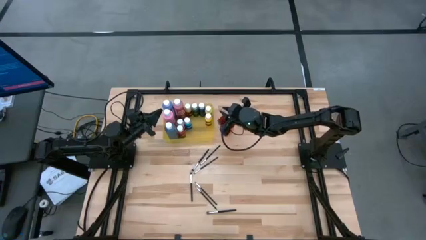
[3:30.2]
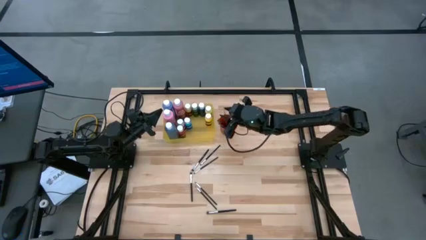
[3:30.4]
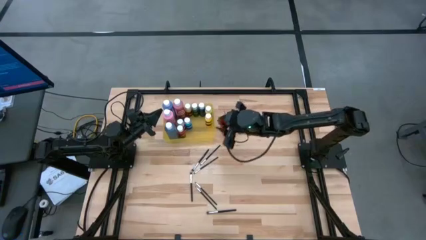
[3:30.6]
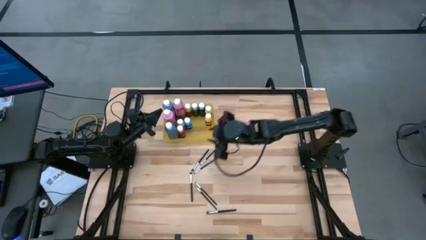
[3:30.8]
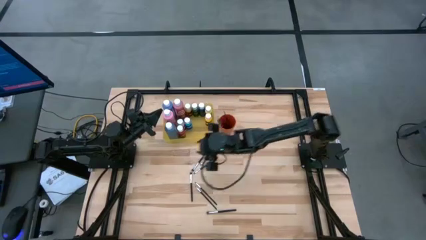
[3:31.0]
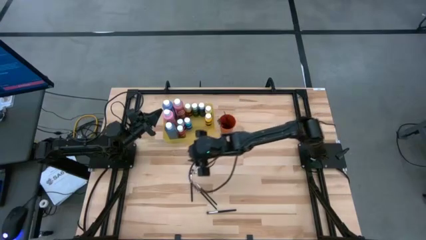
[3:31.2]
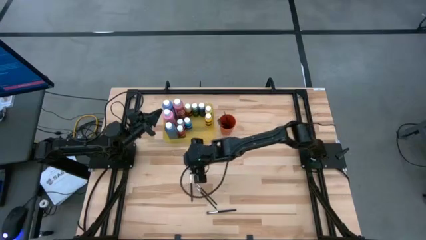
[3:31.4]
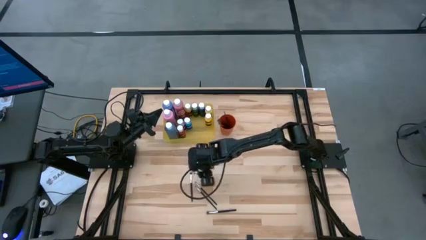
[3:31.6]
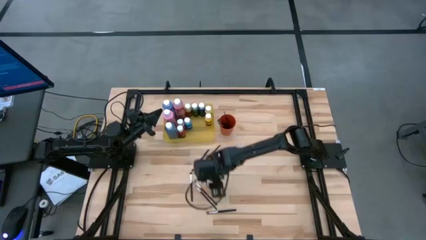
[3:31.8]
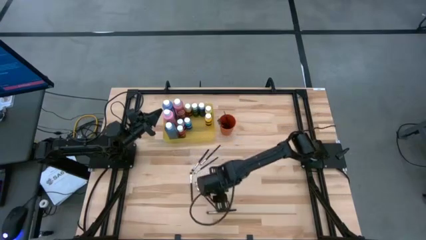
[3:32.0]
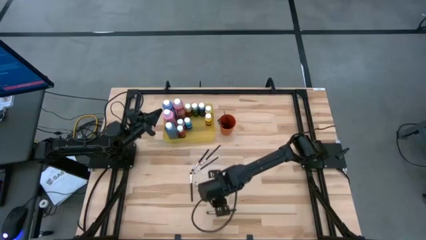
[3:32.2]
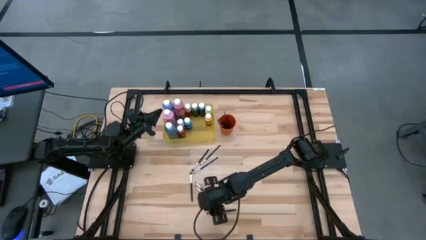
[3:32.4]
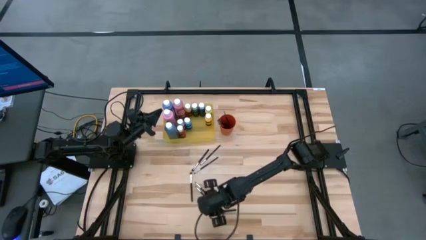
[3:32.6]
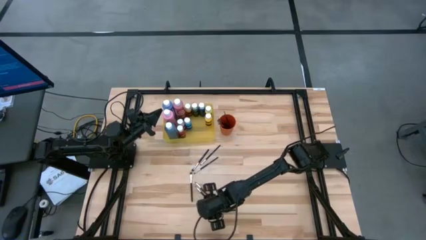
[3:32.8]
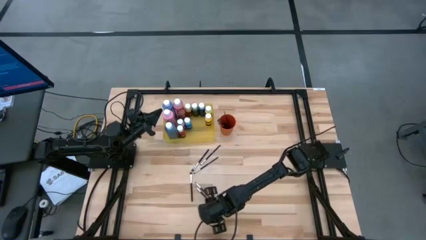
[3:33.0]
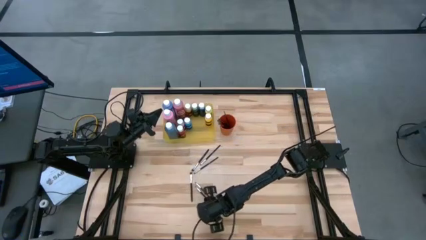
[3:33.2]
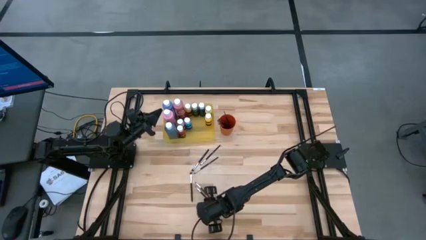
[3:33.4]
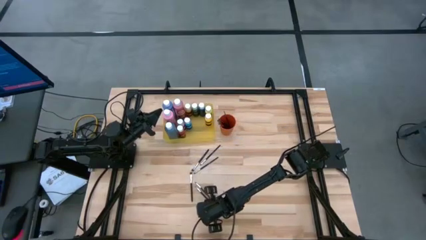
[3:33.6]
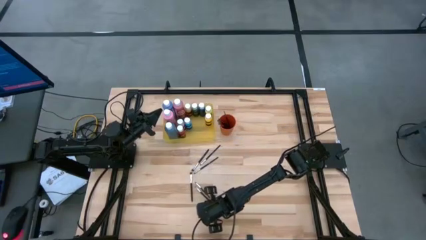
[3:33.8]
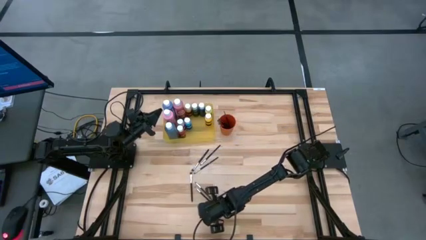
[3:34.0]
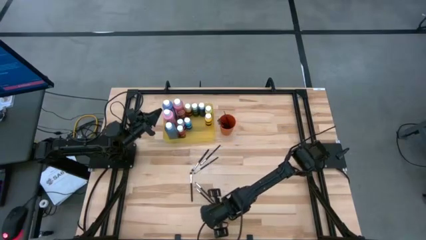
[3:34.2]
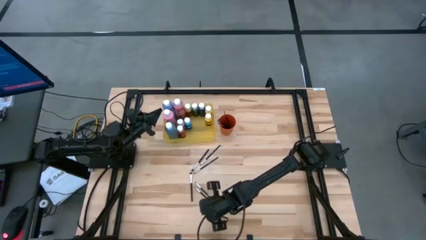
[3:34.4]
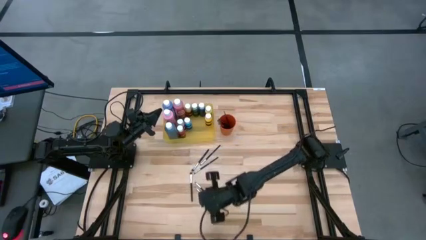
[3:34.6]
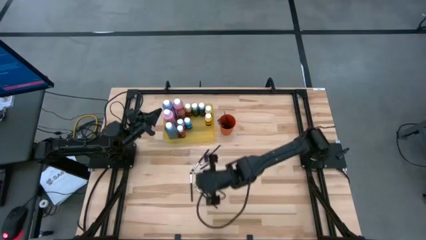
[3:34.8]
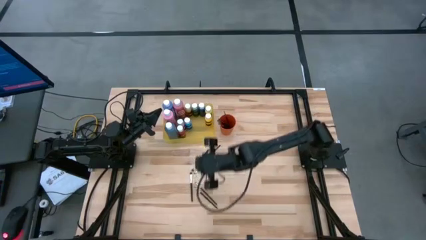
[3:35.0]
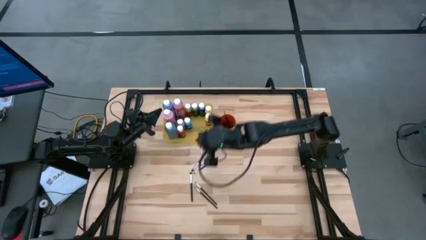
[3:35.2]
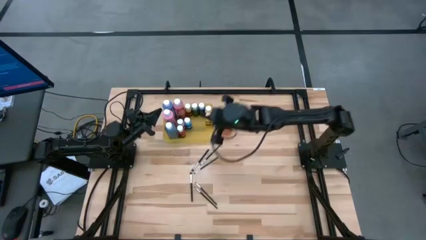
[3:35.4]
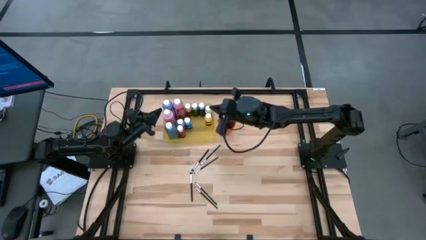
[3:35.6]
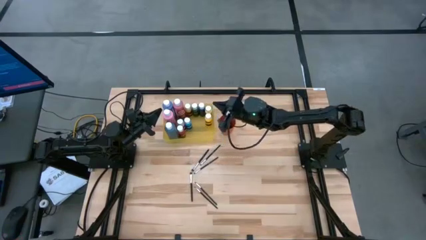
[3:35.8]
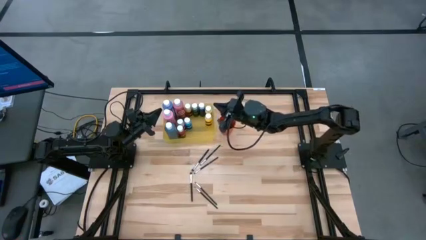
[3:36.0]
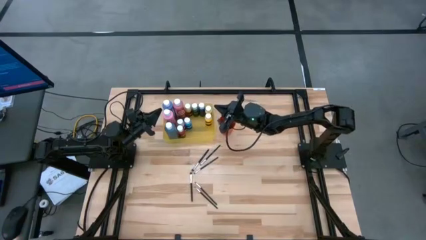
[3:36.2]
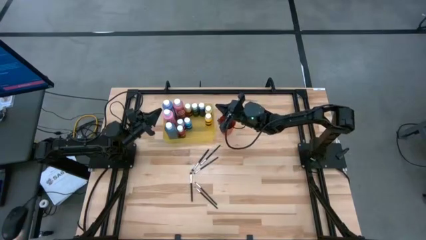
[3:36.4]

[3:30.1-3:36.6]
Task: Pick & Place Paint Supplies
Put the silver paint brush into the orange cup

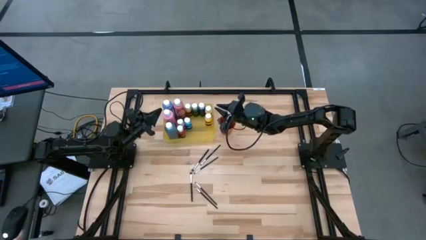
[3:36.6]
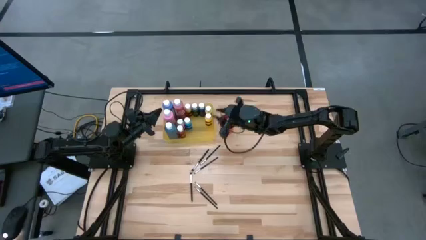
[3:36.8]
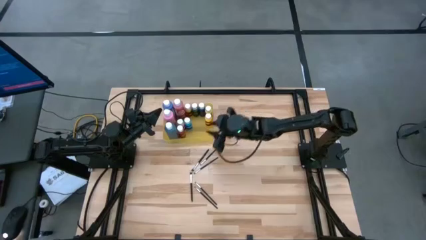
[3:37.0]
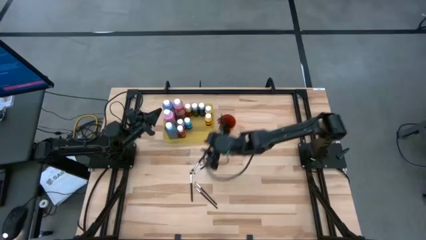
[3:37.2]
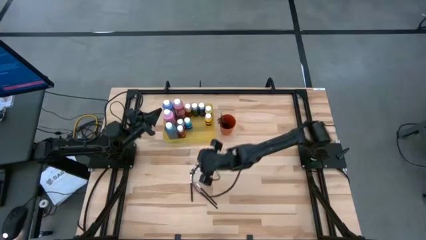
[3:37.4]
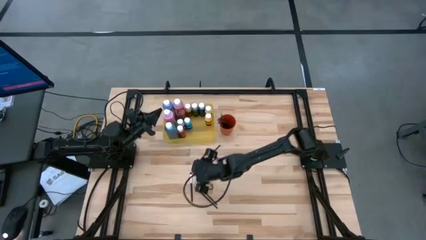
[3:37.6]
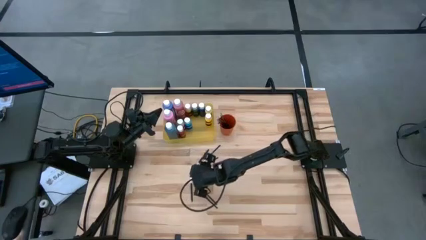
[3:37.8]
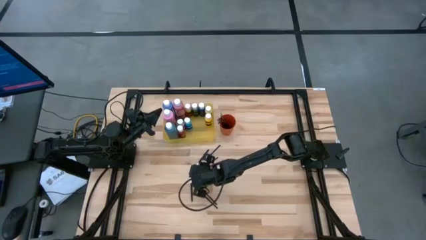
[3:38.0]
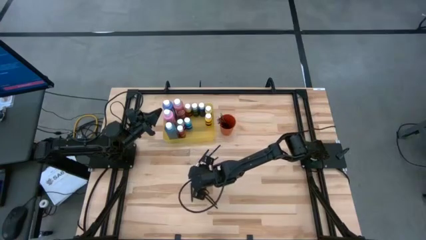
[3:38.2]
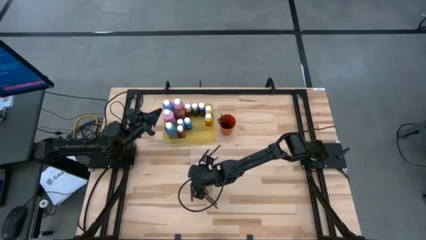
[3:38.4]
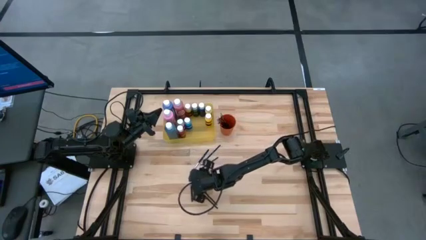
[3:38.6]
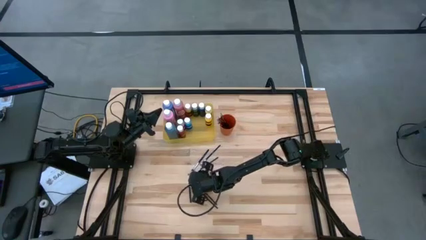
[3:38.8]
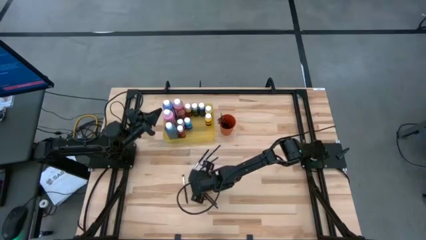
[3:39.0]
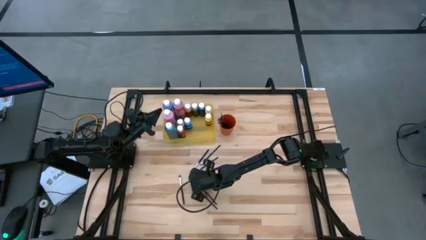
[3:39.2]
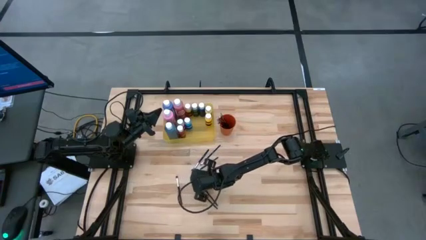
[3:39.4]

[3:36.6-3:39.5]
Put the silver paint brush into the orange cup

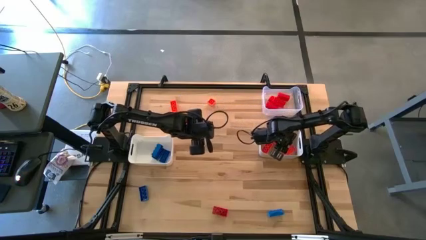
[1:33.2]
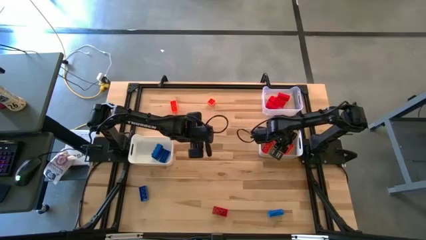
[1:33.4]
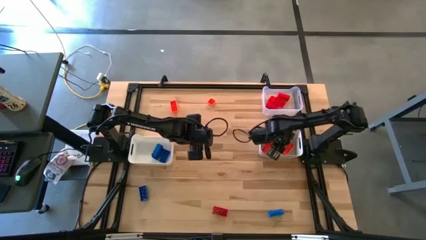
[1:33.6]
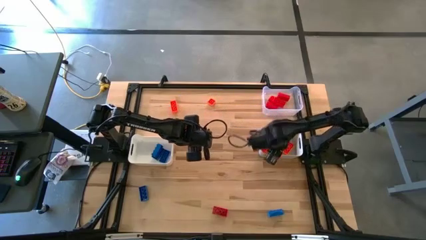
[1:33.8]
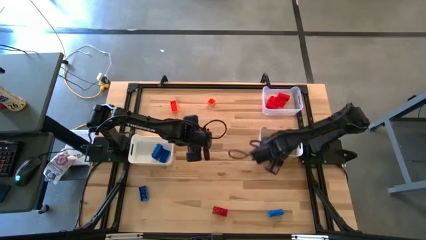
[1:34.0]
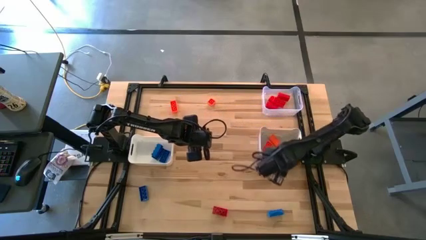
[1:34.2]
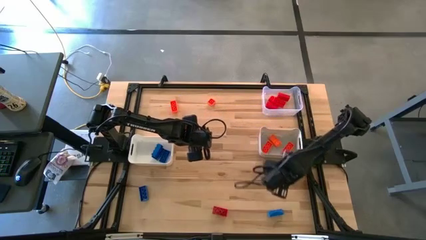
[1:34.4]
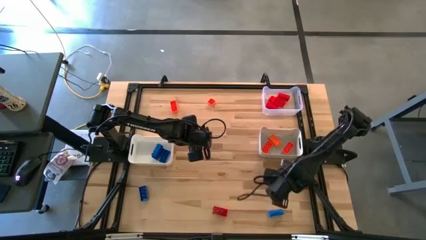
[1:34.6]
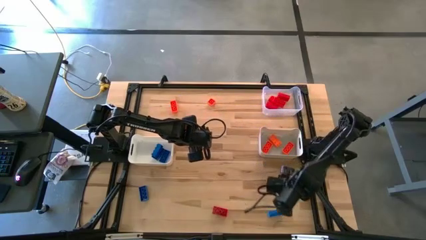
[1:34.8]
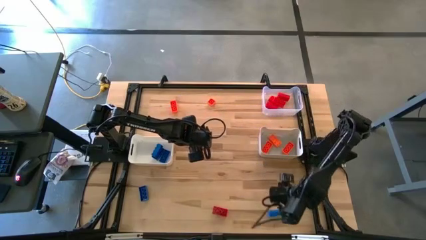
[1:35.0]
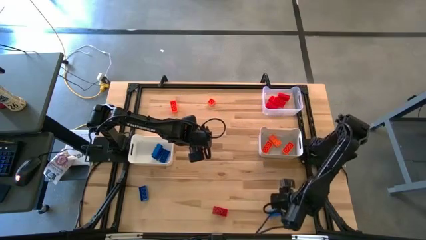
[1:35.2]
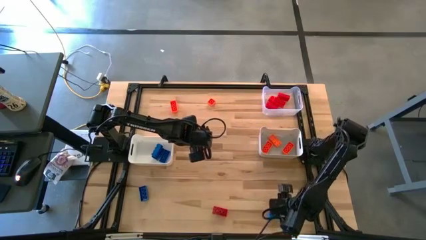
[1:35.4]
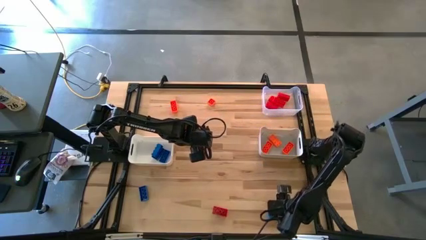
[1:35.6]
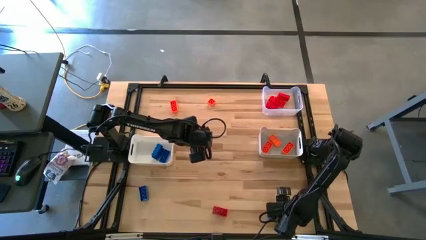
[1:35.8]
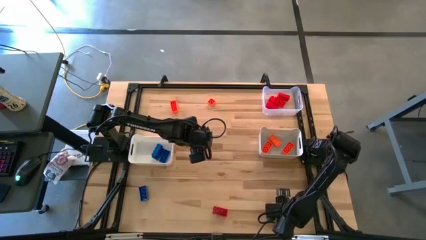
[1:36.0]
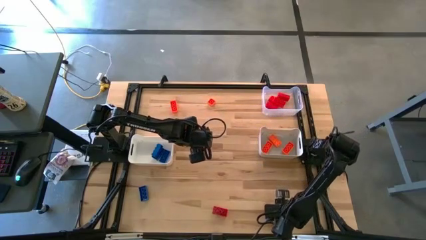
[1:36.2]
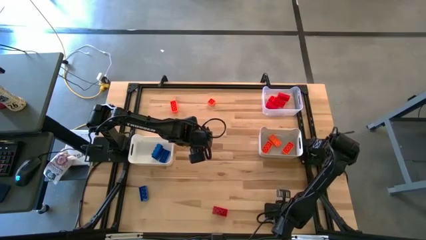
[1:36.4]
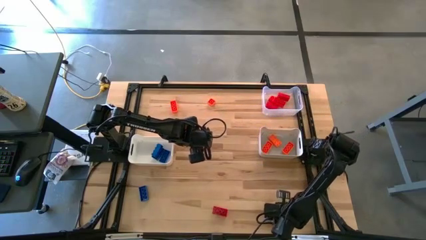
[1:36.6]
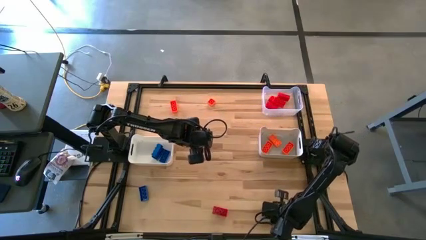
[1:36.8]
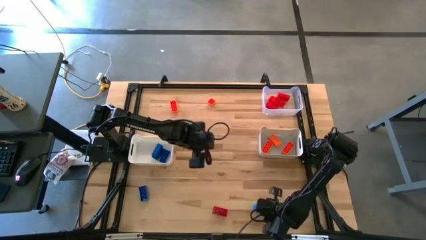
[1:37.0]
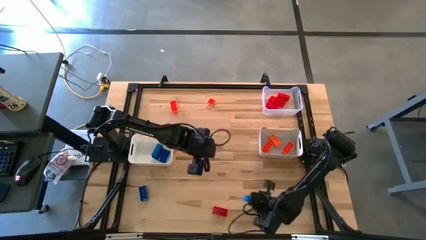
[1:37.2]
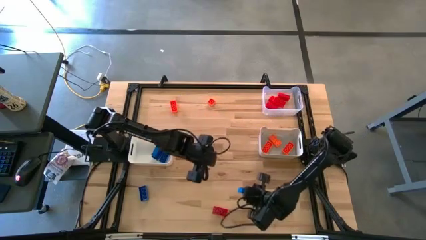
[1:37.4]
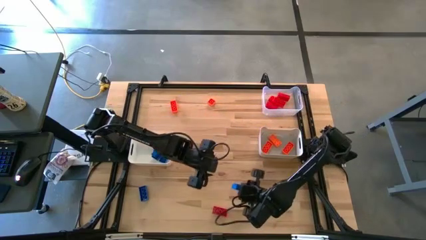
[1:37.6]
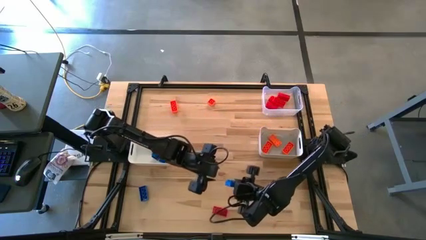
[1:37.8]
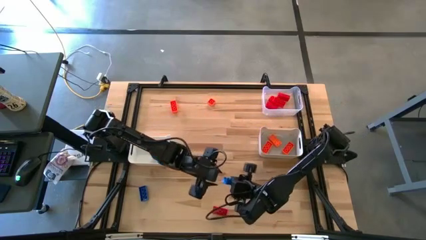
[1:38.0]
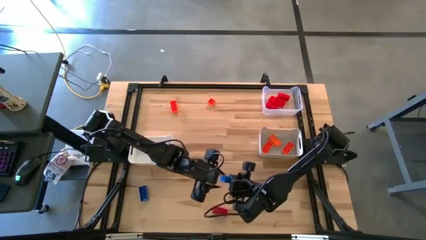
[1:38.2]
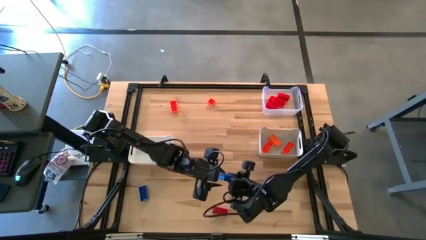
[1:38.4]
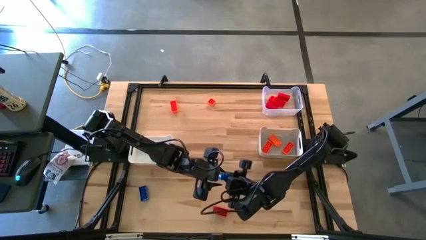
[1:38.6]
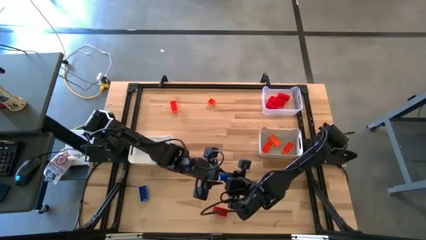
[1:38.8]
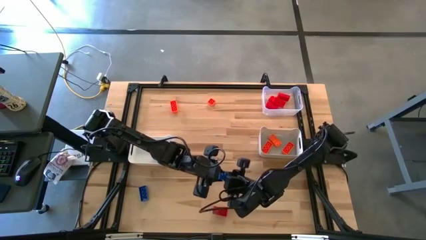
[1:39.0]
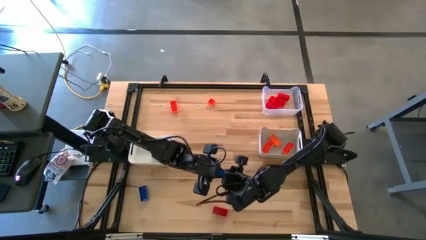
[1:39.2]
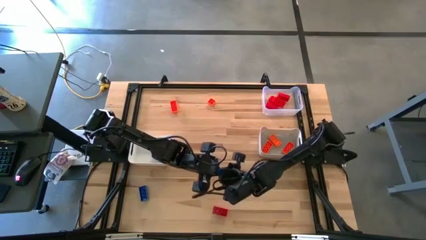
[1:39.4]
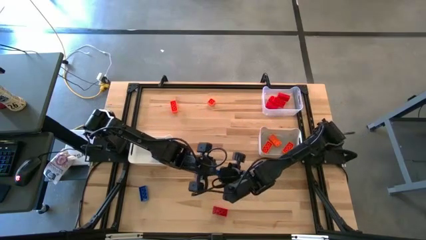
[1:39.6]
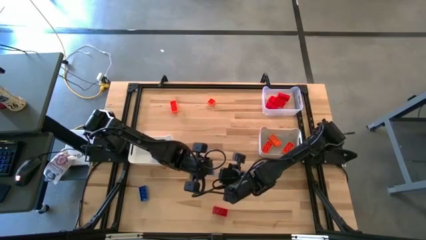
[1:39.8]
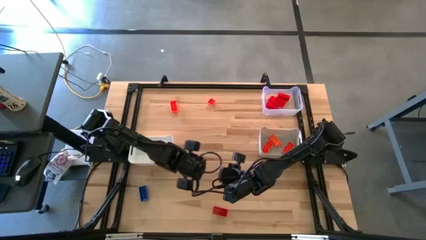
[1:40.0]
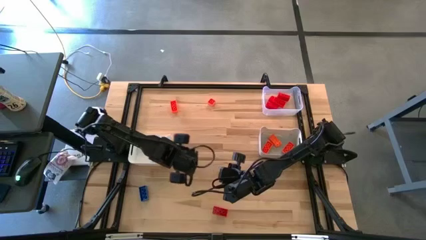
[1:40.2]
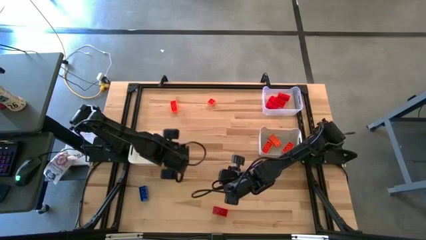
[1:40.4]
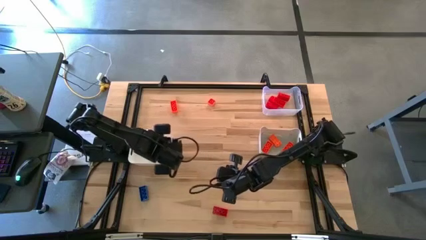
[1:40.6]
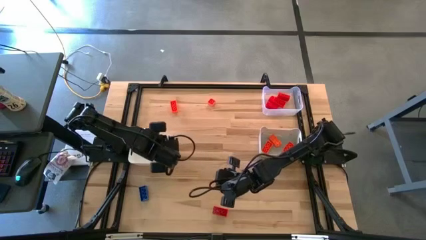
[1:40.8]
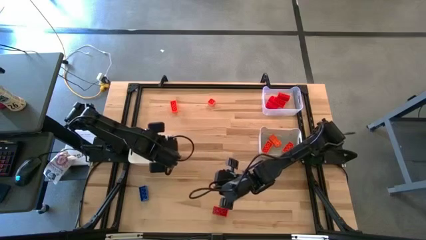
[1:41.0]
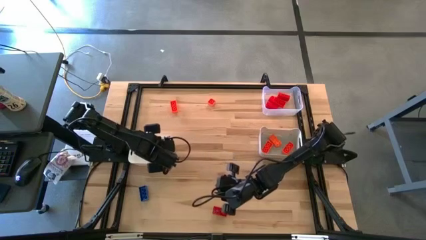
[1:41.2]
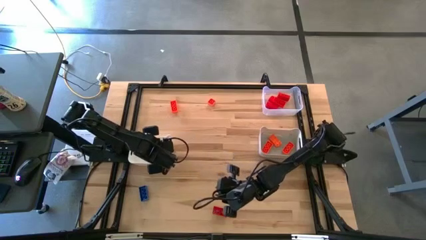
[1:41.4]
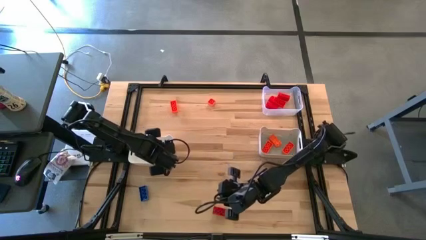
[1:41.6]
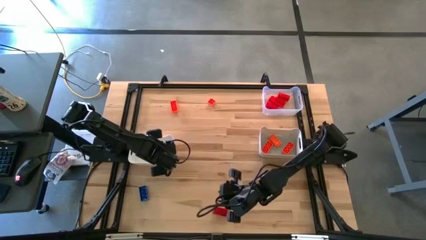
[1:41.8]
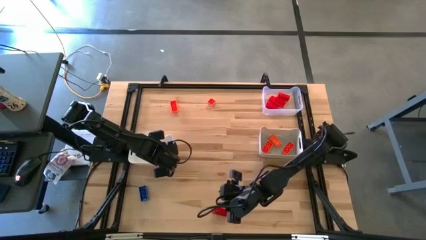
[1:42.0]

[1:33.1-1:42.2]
Task: Sort & place blocks by color
Put the blue game piece into the white bin
